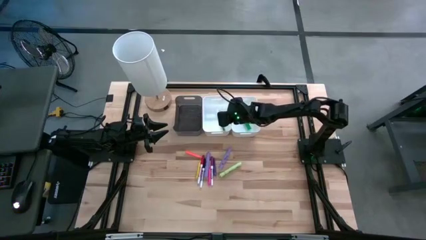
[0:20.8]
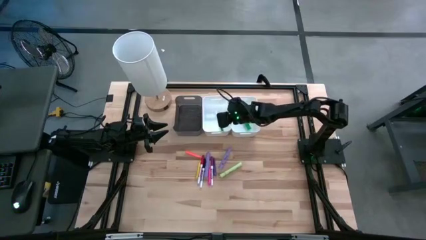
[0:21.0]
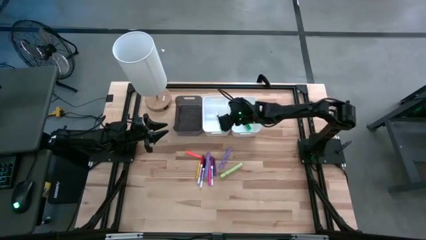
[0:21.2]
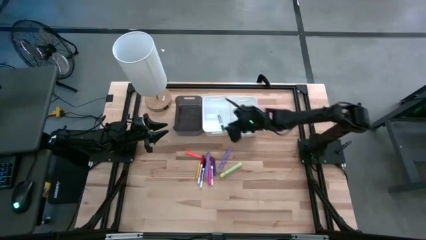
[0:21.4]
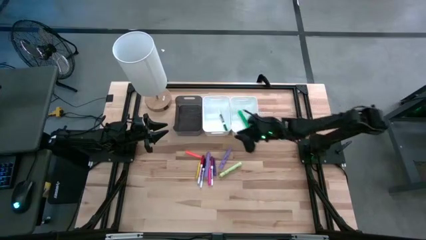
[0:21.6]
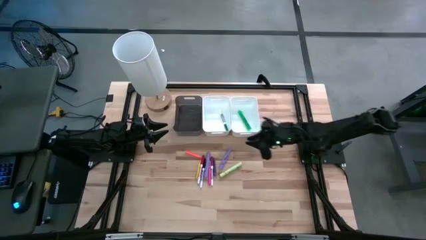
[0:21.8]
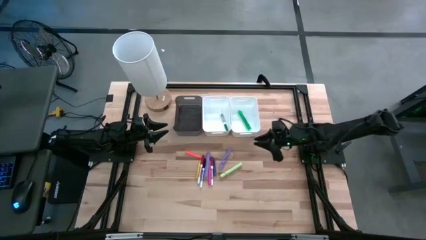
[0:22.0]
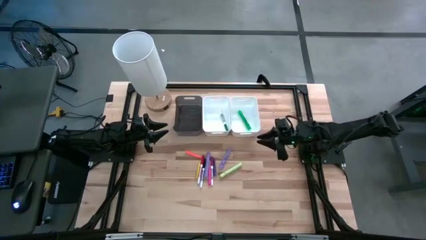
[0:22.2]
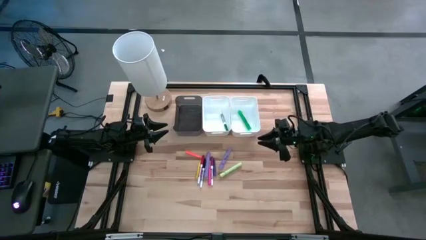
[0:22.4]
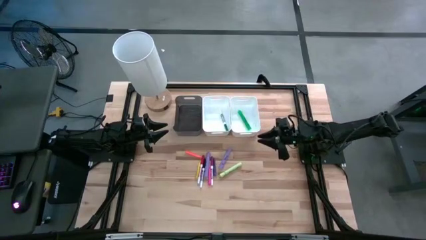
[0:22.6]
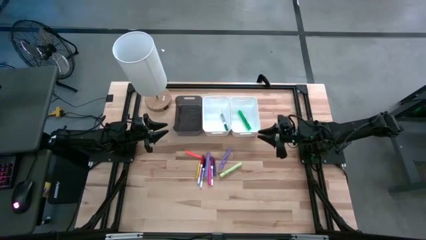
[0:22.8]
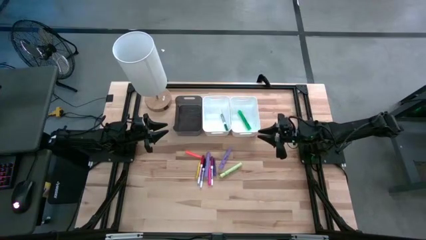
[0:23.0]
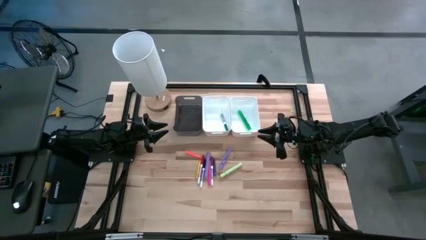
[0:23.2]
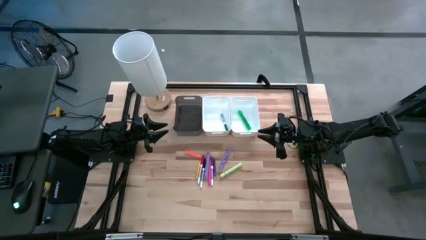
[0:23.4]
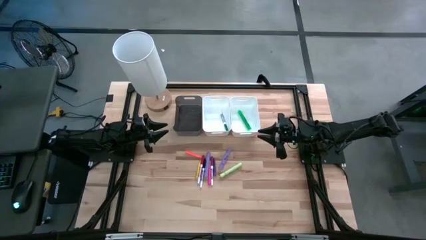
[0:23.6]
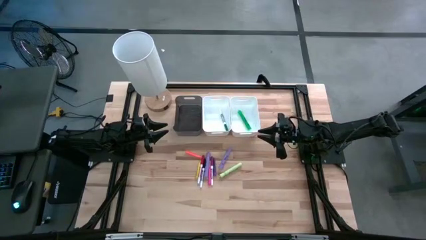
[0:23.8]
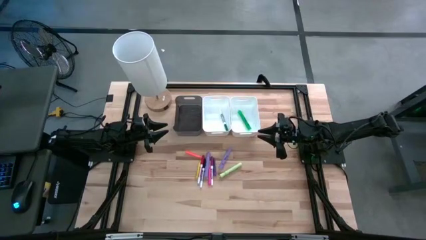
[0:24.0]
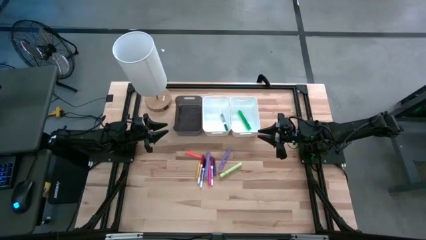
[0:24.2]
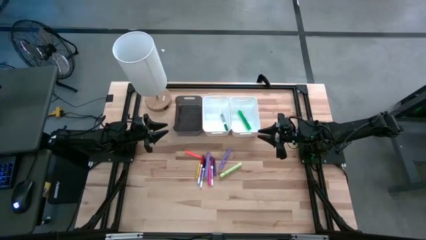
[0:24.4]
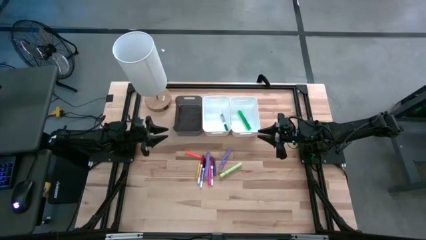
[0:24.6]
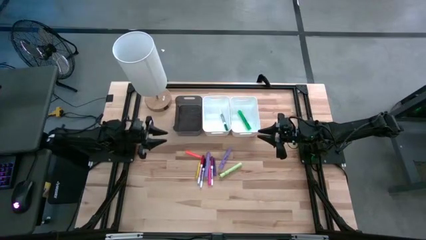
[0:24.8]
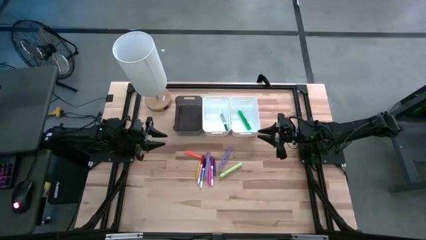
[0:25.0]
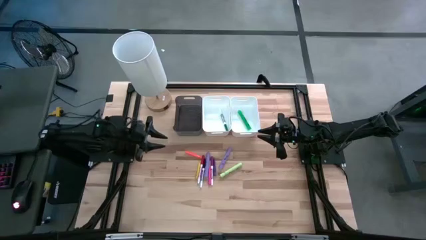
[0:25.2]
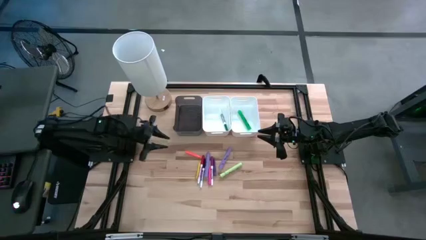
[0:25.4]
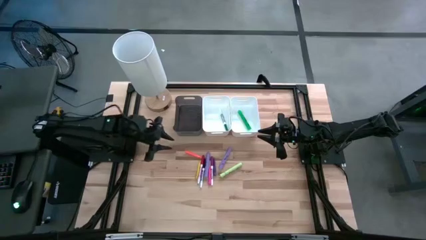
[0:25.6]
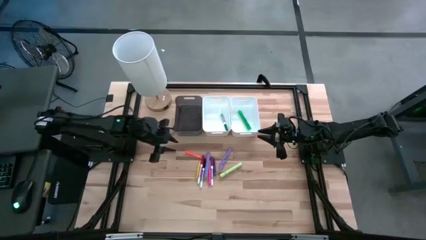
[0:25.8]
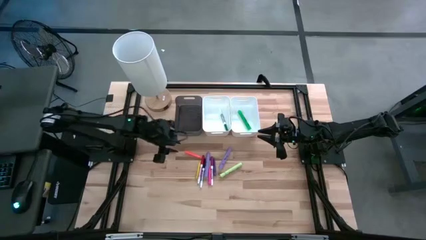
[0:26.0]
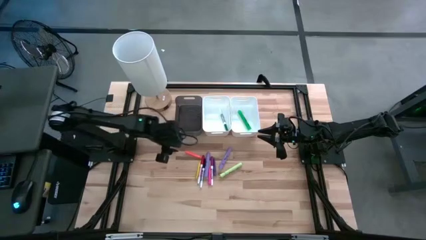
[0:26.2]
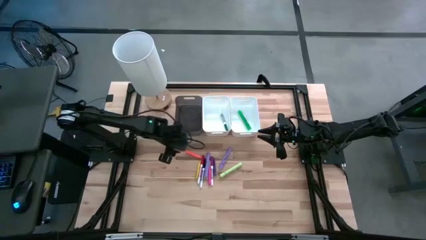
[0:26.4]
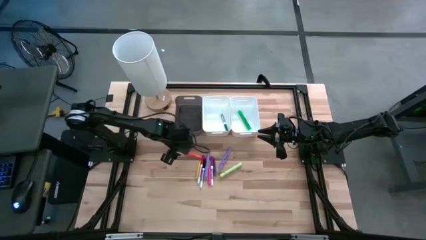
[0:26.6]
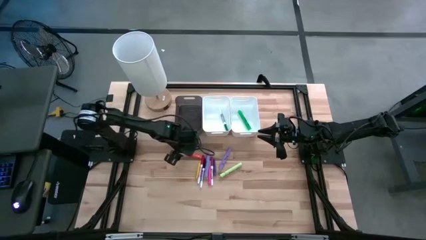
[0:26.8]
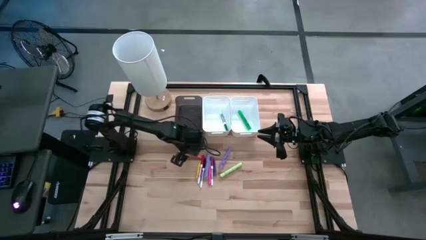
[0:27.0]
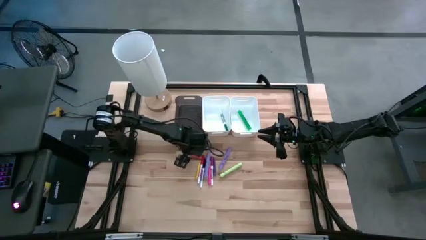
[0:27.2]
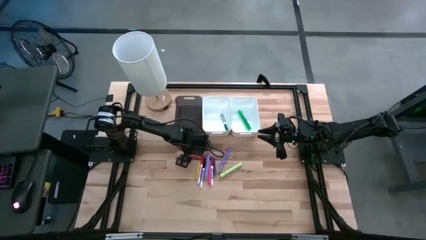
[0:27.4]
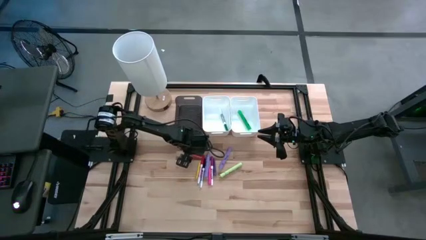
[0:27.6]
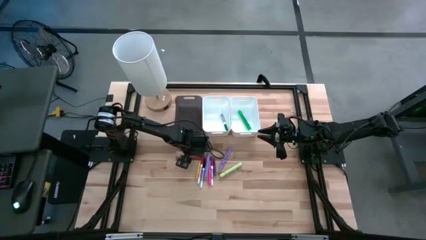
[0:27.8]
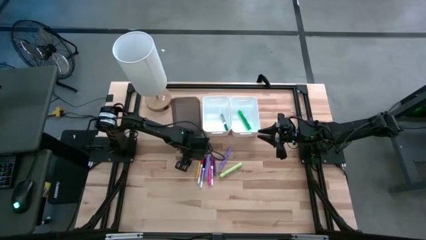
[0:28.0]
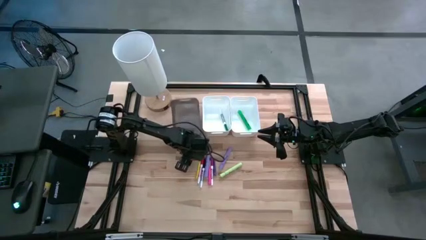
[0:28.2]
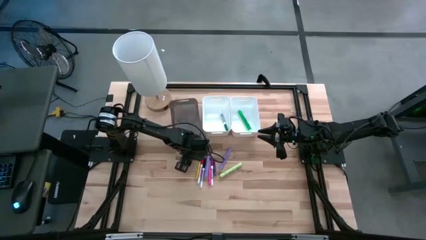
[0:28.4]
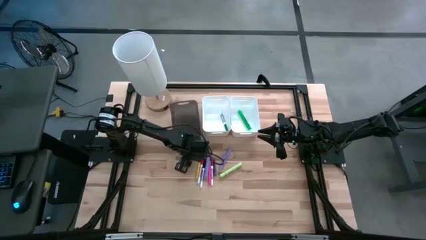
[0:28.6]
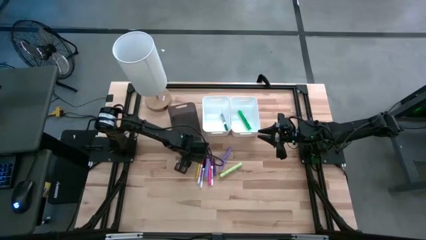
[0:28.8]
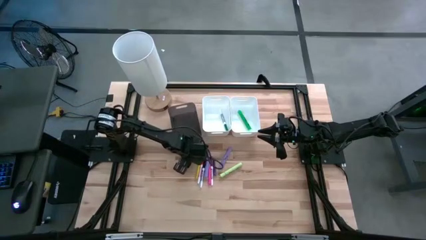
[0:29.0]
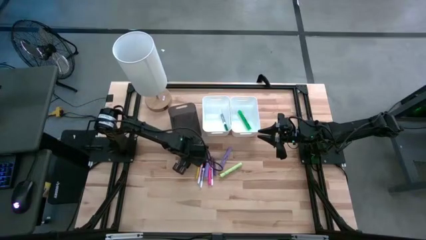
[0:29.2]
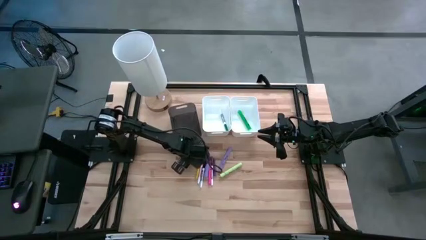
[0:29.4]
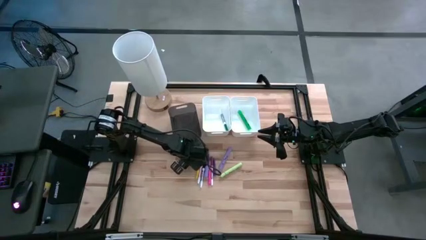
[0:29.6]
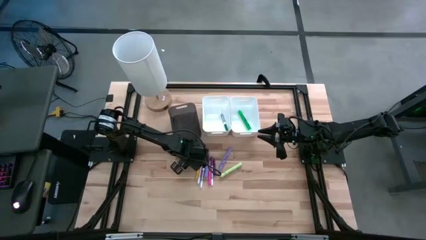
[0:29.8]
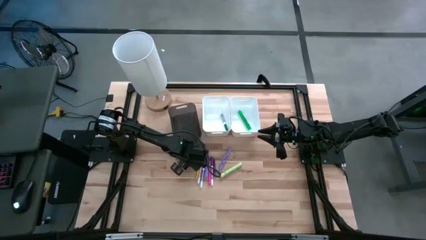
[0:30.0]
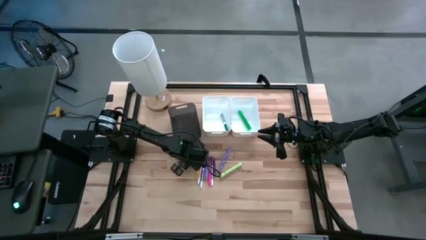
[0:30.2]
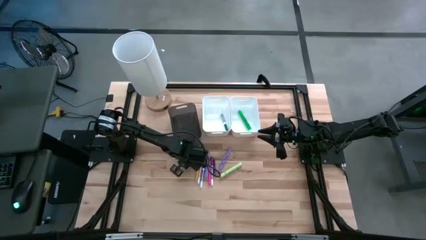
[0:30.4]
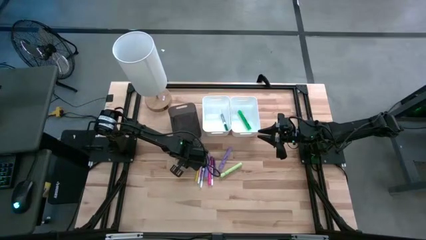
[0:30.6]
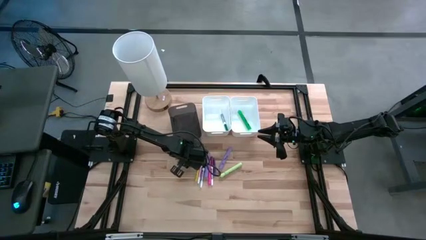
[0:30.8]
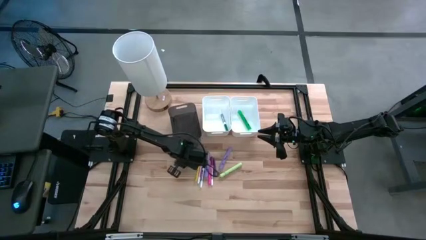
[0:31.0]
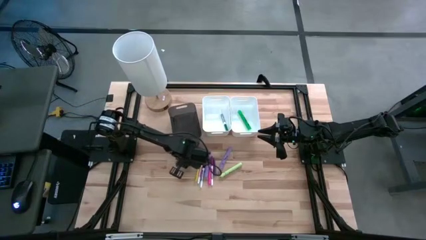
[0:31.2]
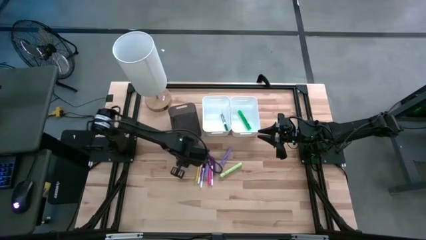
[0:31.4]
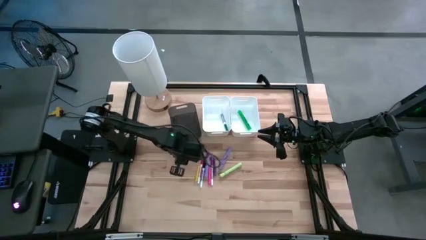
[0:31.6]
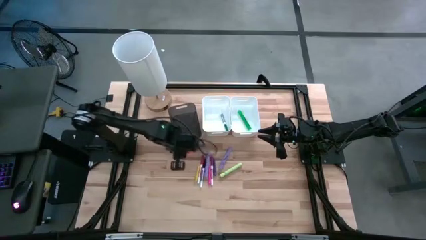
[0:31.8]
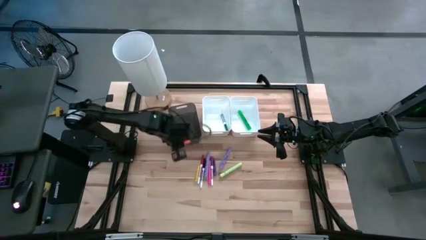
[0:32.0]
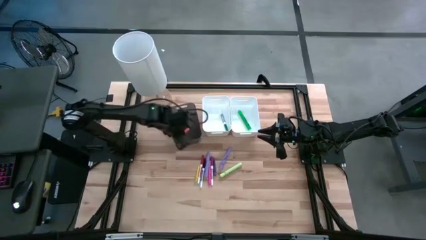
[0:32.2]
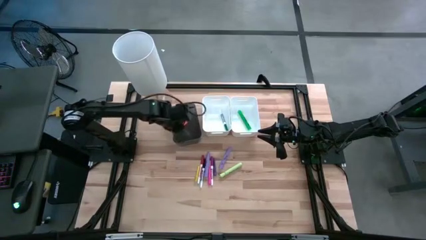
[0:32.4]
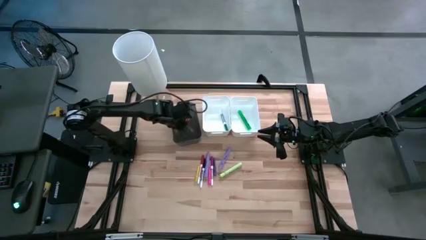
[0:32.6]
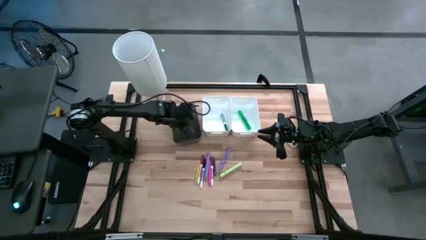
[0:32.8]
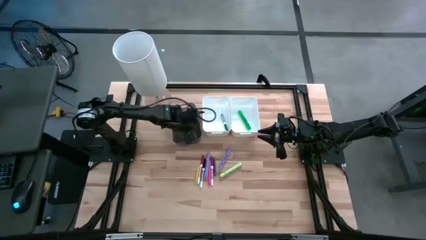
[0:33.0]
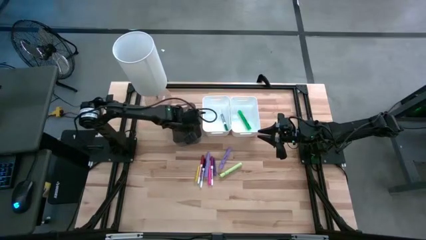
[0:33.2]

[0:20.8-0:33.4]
Task: Pick & Place Markers
Put the orange pen into the black bin
